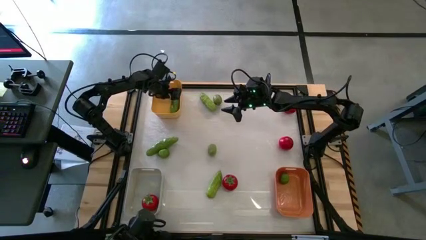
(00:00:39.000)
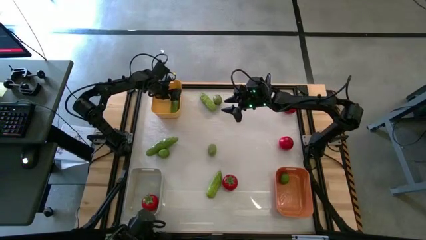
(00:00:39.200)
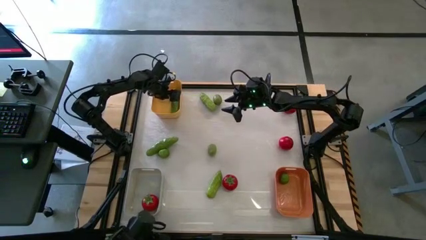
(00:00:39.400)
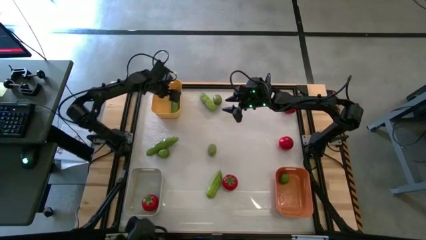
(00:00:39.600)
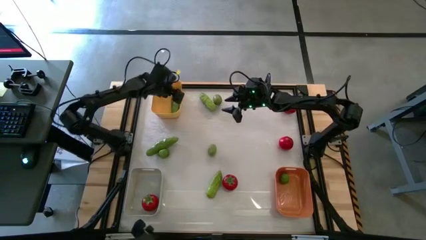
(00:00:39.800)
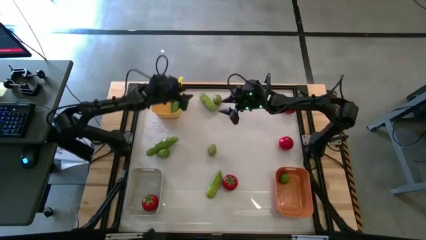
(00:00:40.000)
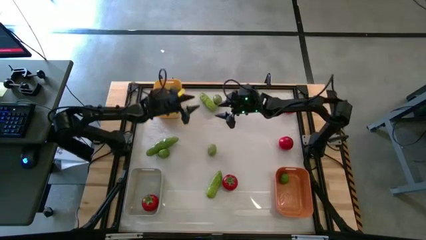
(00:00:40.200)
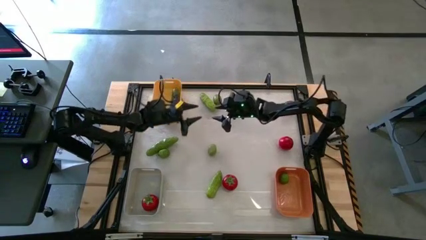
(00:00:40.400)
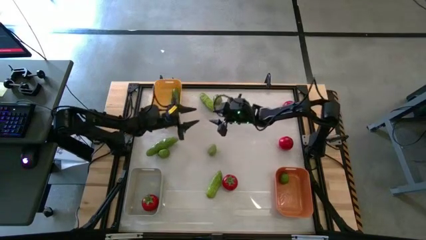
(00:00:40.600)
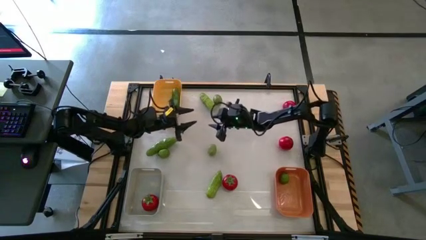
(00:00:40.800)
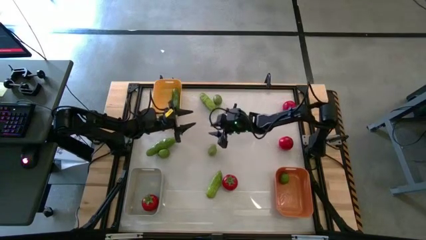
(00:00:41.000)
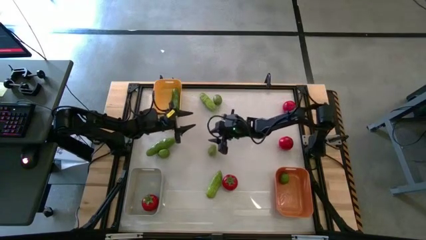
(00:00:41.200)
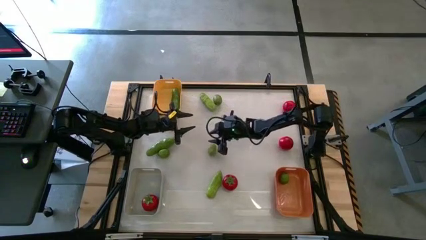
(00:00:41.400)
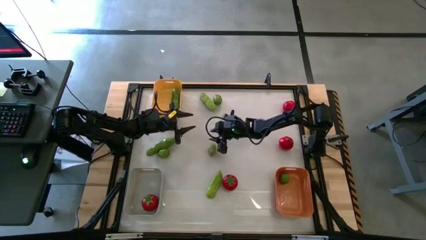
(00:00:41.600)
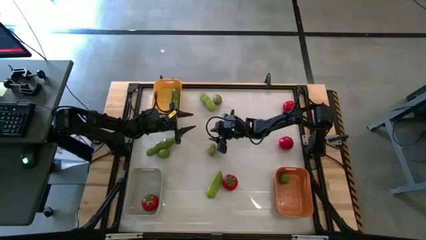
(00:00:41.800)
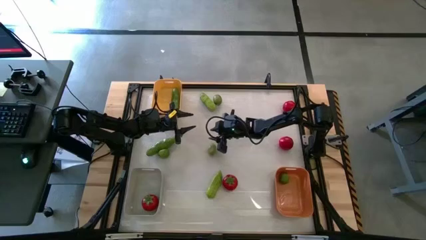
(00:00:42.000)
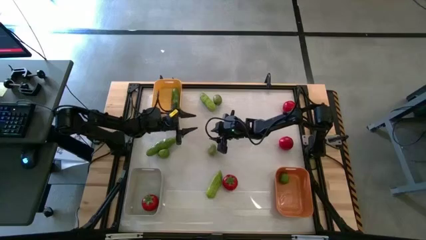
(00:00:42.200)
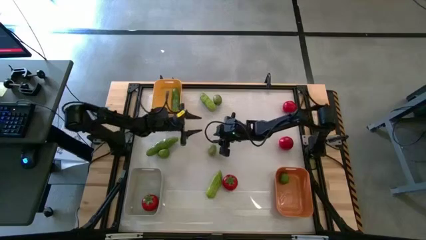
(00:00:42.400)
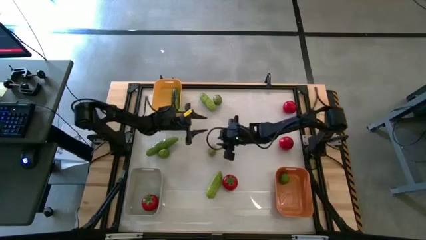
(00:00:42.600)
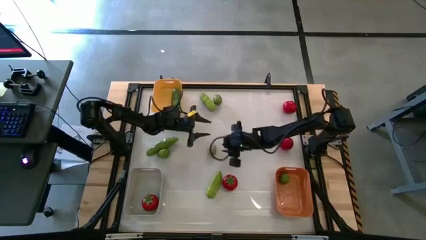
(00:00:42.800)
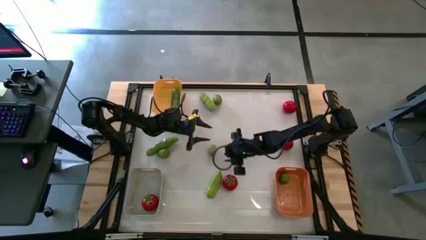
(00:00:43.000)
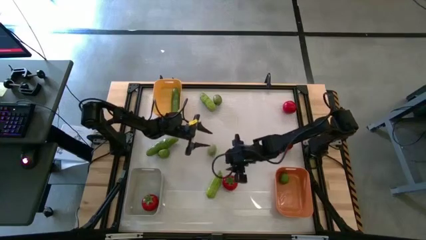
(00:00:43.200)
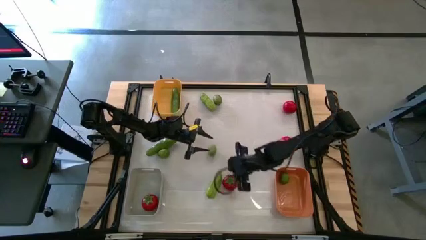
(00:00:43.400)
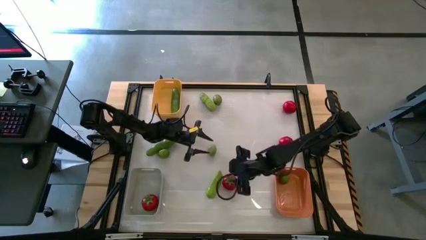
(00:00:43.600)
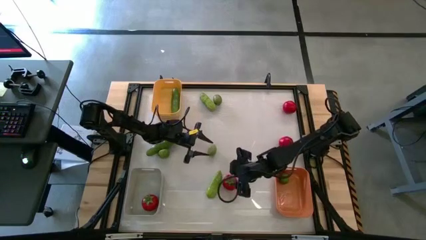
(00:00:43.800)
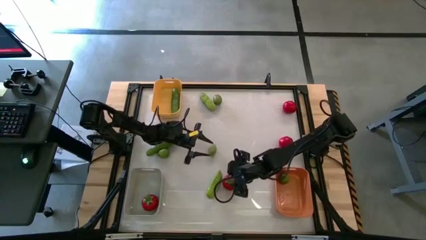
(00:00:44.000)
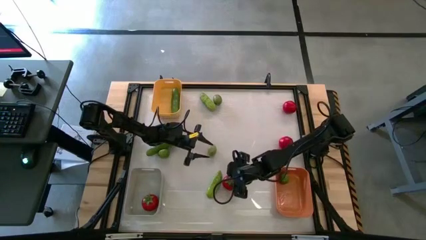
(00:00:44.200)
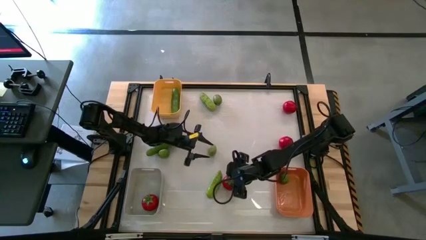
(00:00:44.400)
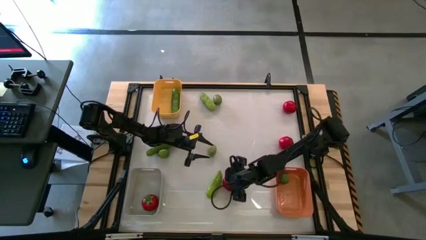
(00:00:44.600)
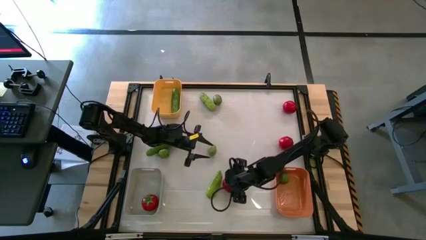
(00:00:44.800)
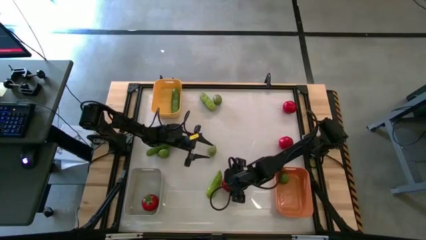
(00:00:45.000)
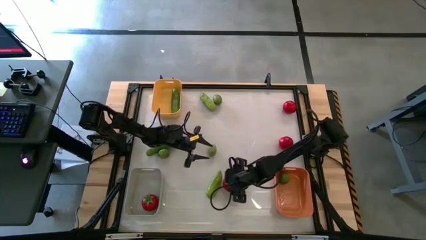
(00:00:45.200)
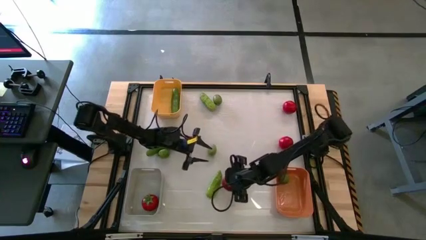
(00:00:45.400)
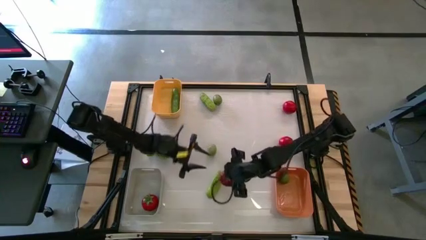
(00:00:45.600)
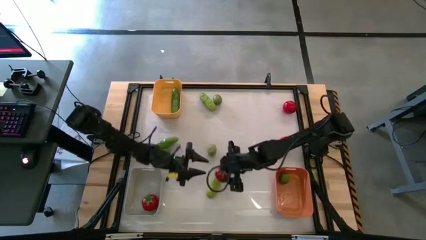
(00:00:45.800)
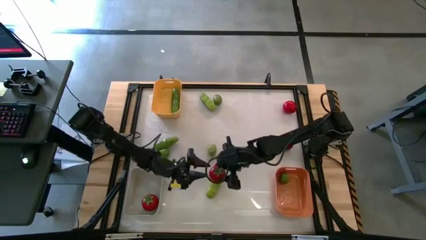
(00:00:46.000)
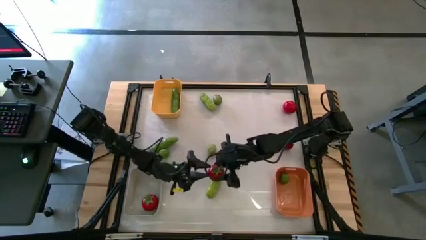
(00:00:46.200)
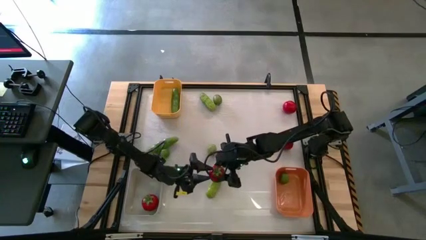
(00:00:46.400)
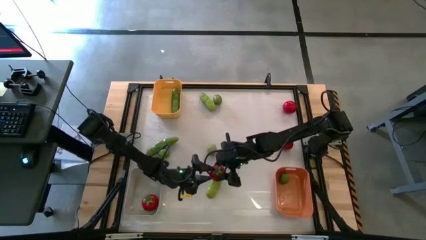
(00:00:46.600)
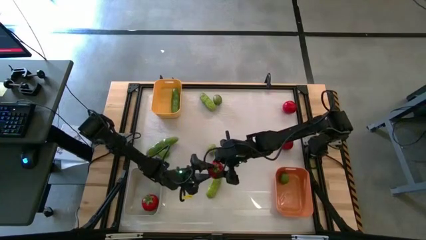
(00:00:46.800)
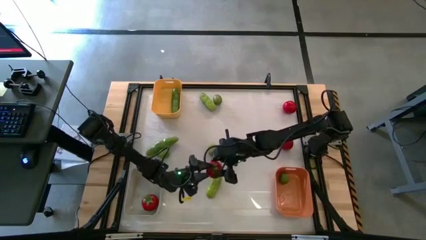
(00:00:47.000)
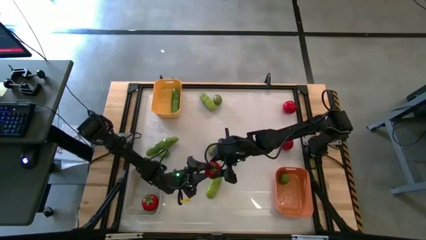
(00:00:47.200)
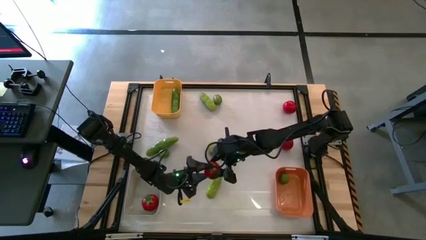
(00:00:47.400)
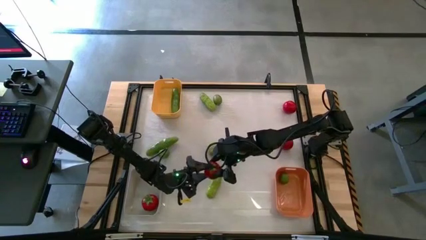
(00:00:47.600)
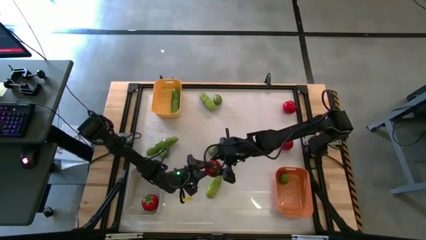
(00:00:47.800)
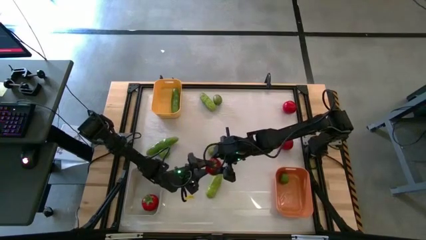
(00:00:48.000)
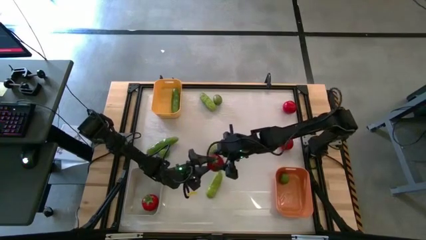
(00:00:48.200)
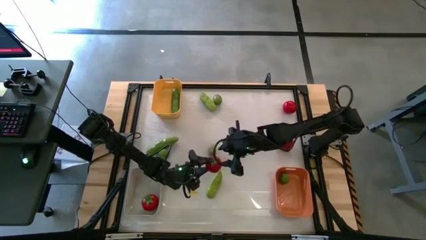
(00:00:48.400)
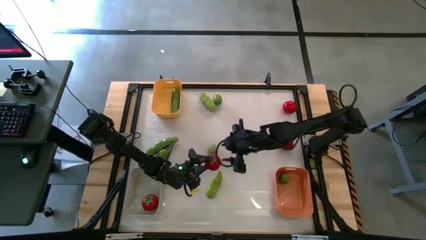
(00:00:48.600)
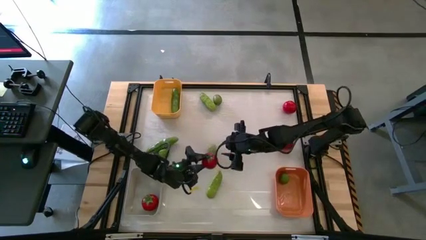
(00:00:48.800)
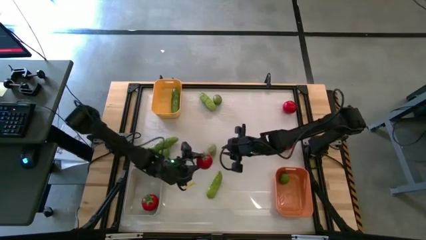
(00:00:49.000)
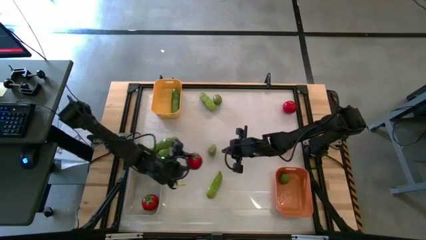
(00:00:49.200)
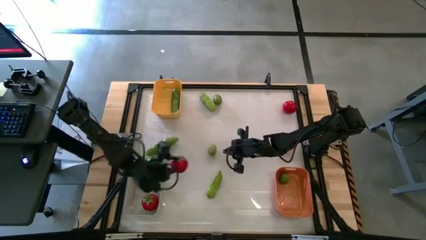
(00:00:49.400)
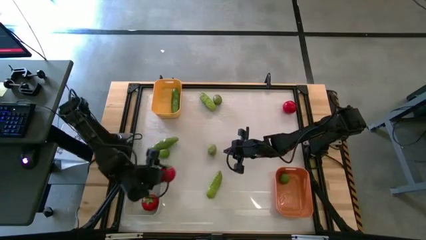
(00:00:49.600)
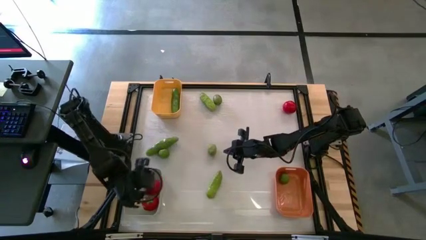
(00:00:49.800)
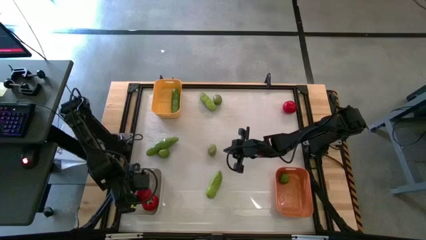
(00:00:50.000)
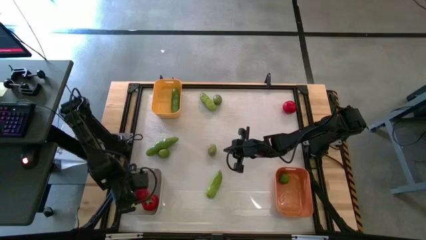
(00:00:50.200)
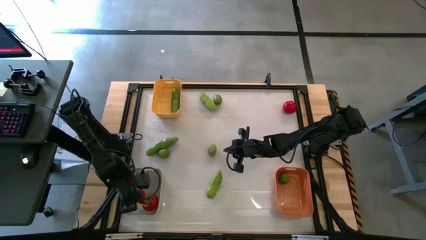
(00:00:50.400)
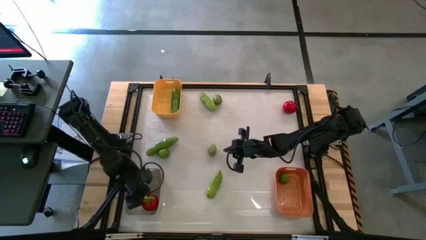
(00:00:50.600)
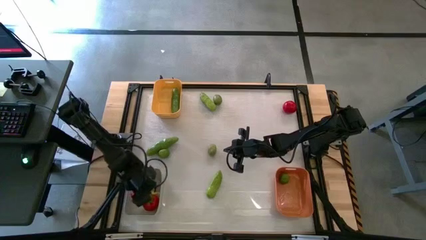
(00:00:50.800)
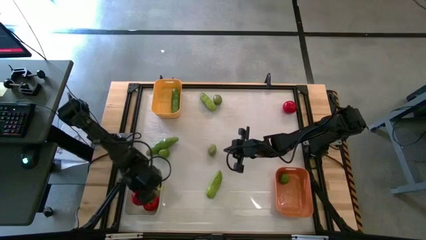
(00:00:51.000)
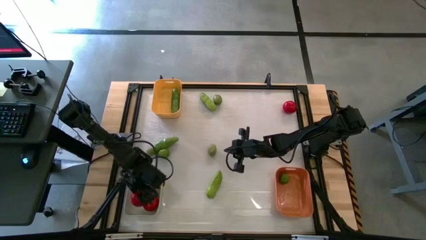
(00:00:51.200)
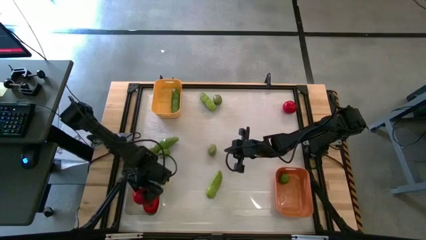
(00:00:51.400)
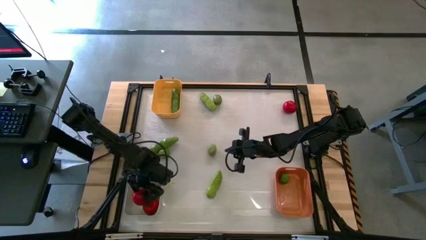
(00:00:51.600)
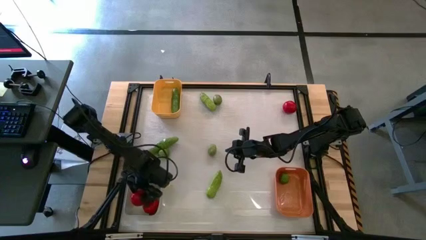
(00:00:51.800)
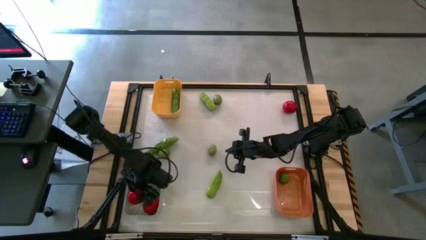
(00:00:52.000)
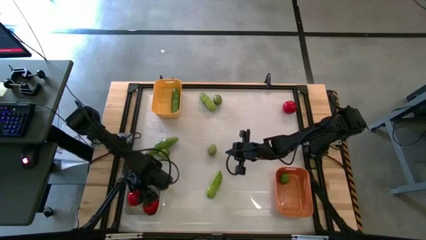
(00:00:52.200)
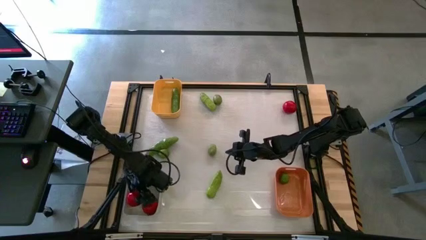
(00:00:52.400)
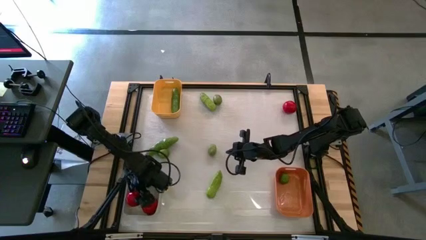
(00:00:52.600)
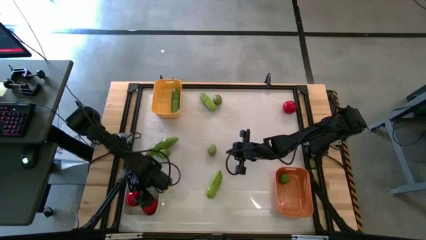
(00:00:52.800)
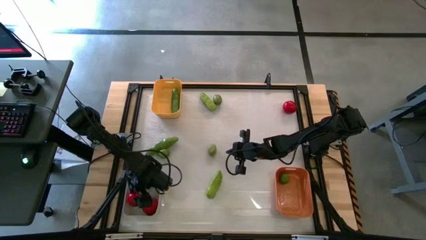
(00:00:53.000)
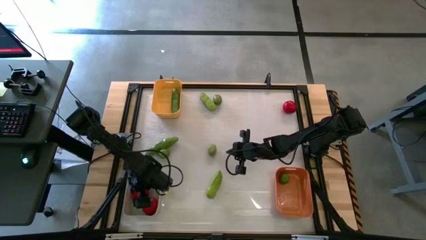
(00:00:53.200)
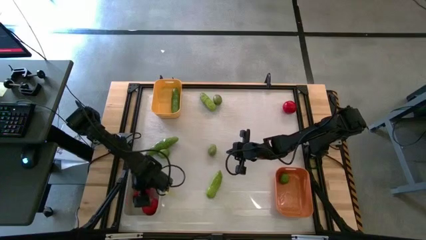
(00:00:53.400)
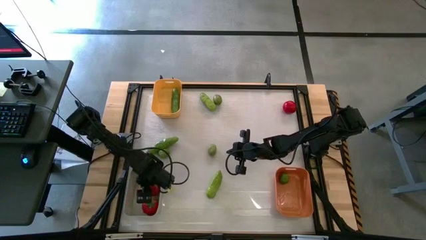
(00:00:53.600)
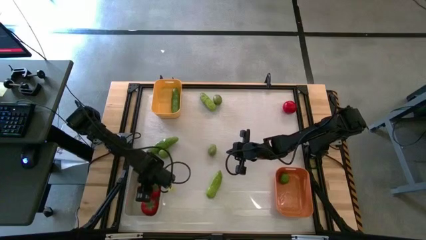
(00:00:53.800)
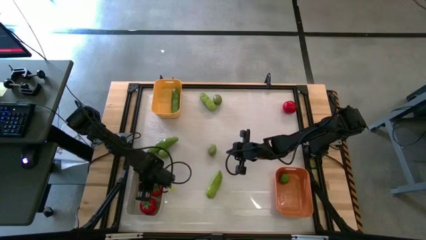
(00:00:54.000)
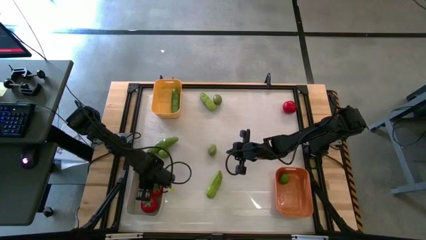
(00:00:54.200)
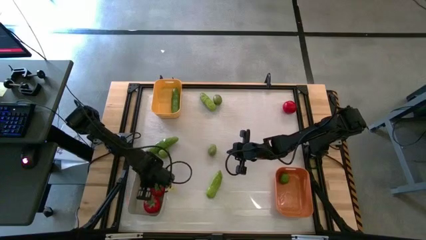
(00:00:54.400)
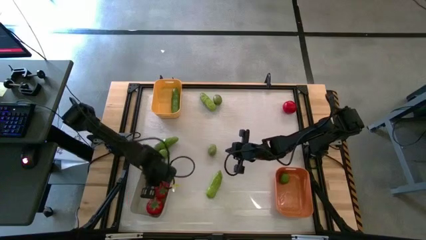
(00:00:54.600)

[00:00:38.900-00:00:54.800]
Task: Sort produce into baskets
Put the red tomato into the gray bin
